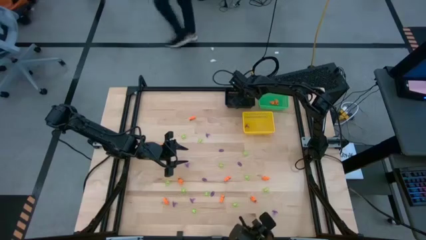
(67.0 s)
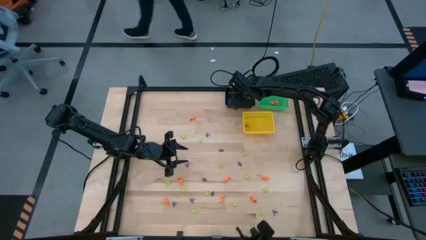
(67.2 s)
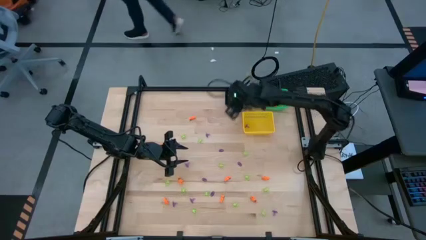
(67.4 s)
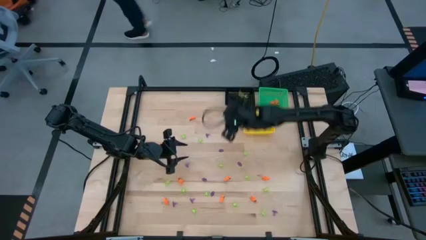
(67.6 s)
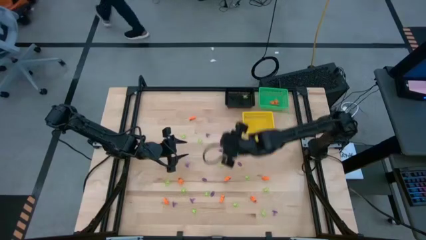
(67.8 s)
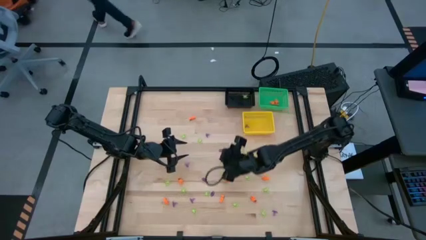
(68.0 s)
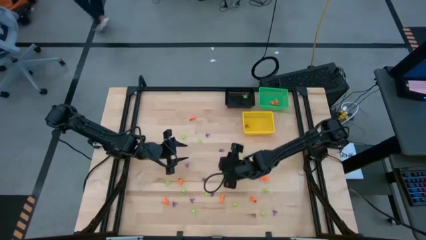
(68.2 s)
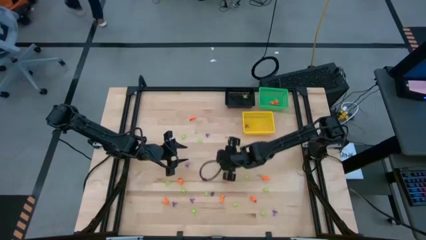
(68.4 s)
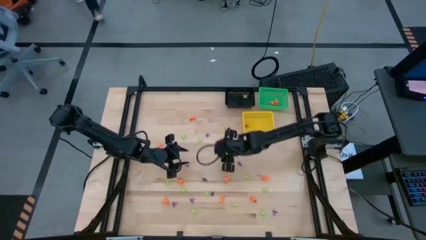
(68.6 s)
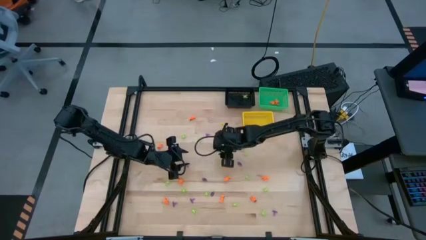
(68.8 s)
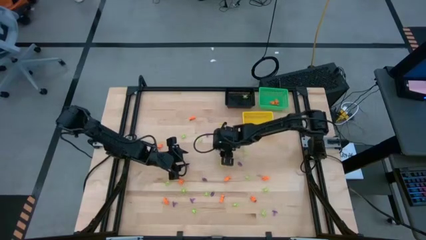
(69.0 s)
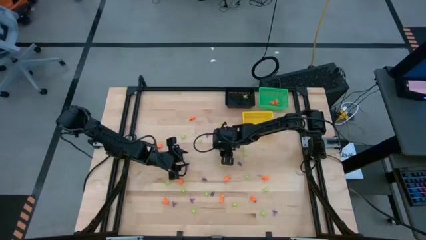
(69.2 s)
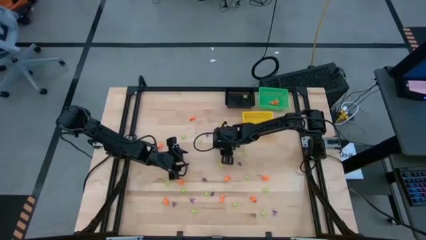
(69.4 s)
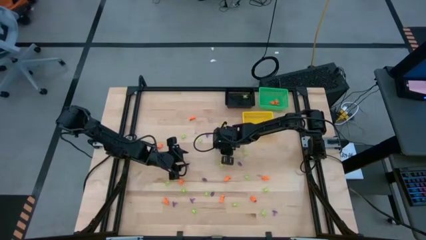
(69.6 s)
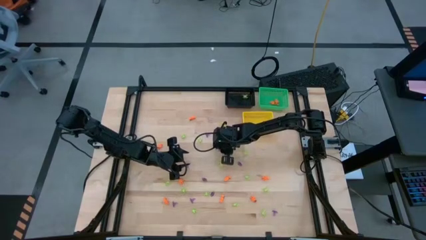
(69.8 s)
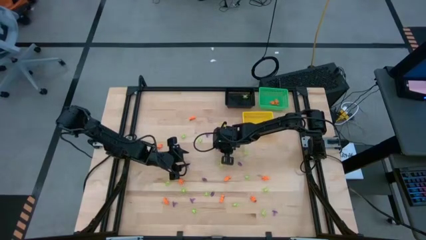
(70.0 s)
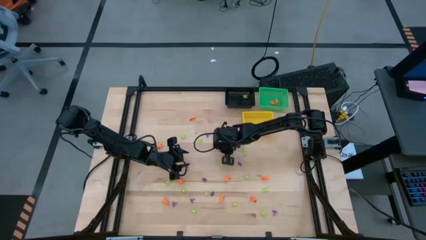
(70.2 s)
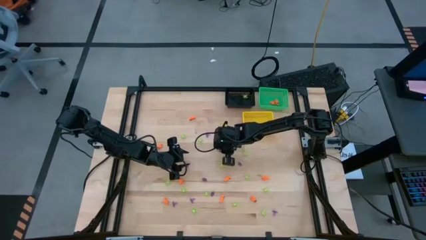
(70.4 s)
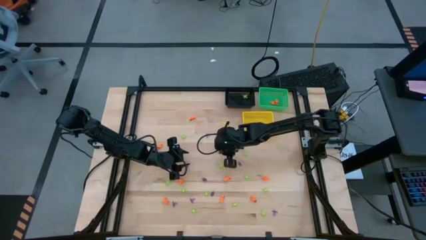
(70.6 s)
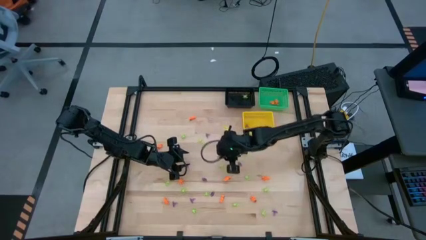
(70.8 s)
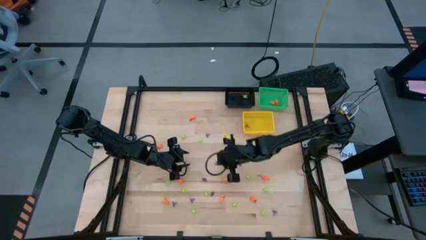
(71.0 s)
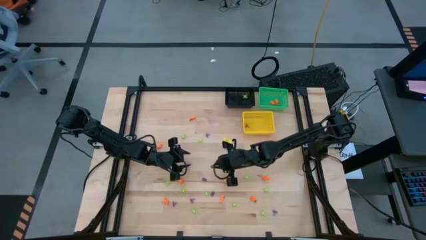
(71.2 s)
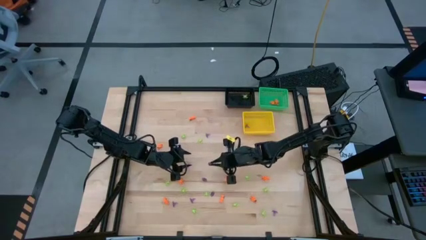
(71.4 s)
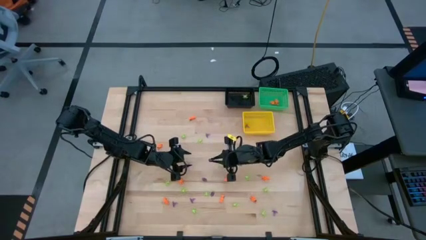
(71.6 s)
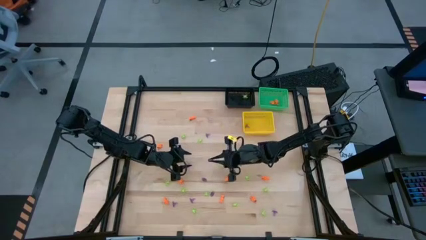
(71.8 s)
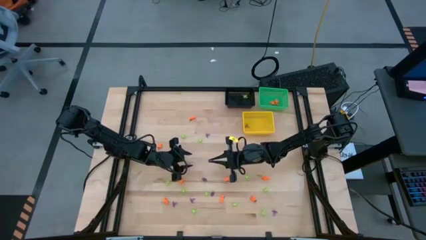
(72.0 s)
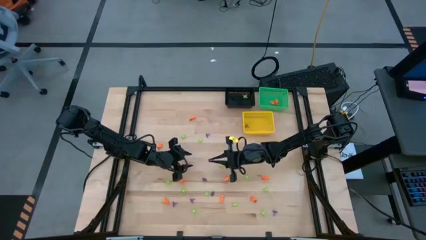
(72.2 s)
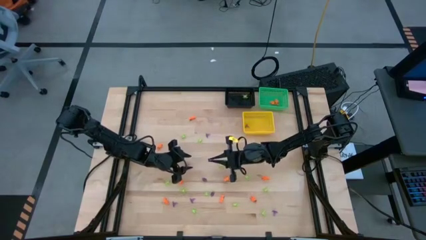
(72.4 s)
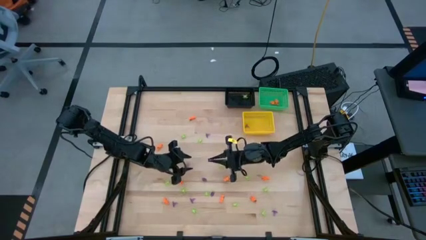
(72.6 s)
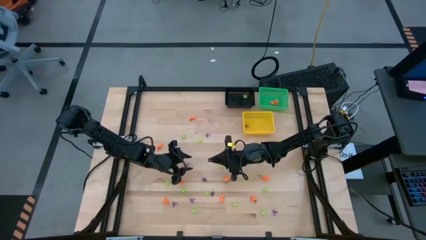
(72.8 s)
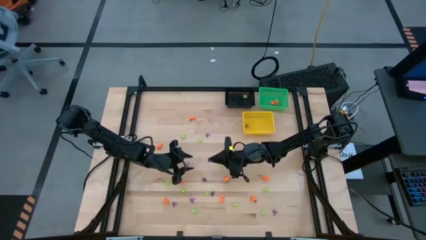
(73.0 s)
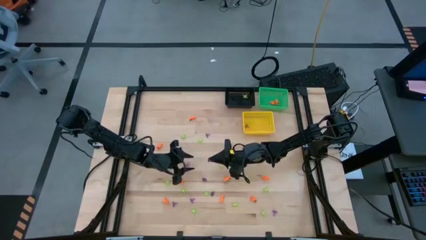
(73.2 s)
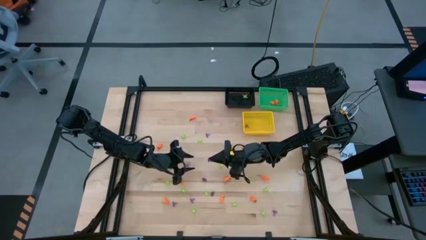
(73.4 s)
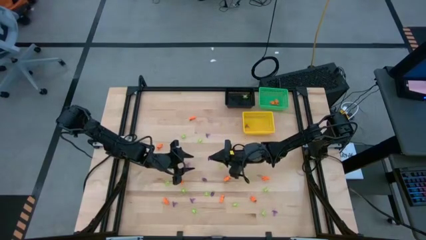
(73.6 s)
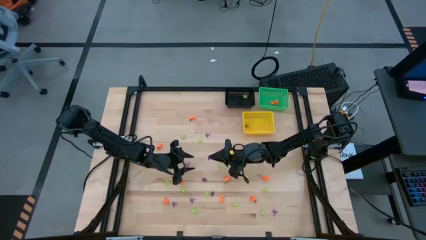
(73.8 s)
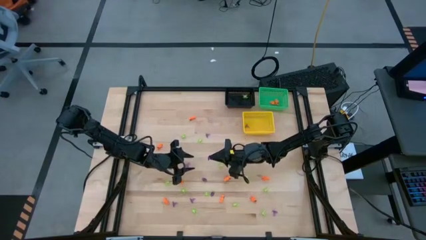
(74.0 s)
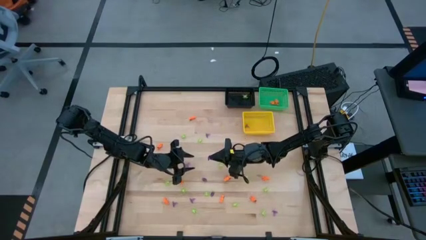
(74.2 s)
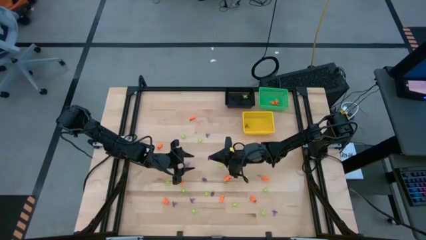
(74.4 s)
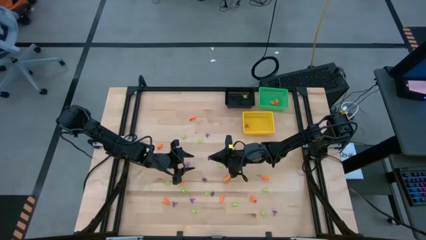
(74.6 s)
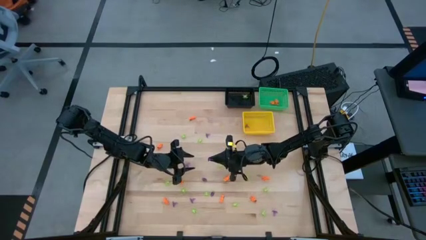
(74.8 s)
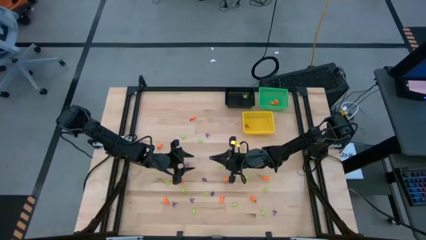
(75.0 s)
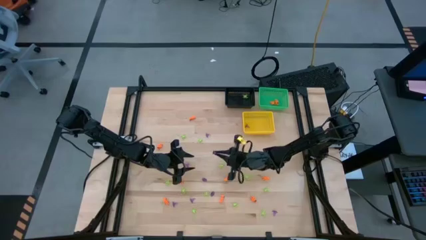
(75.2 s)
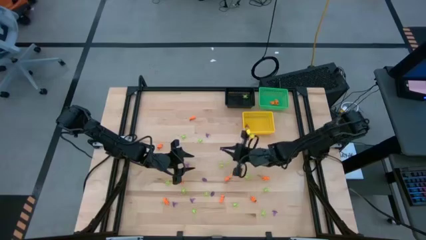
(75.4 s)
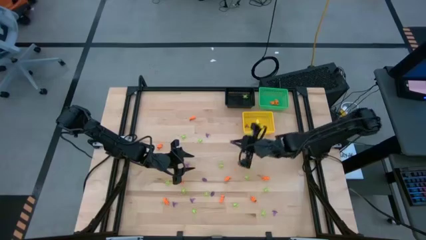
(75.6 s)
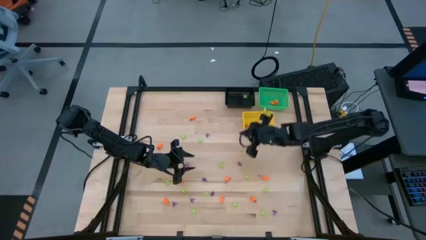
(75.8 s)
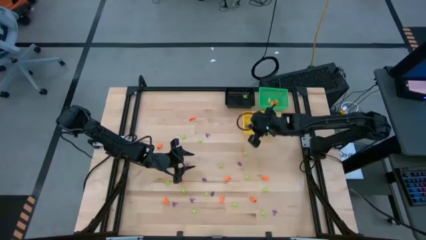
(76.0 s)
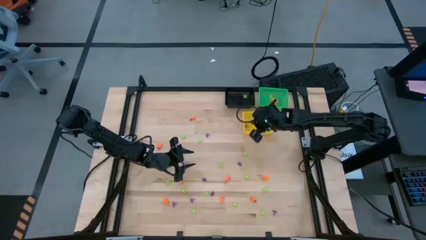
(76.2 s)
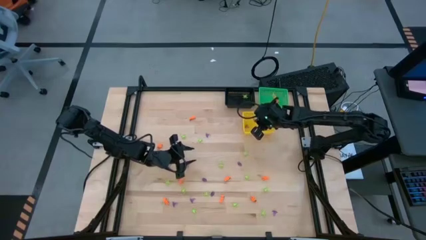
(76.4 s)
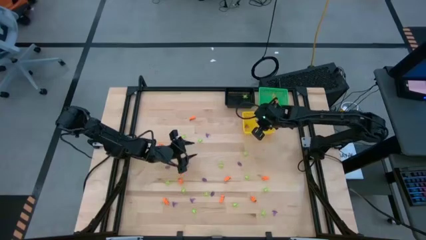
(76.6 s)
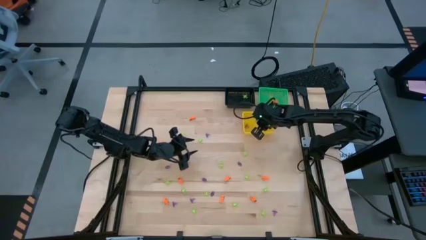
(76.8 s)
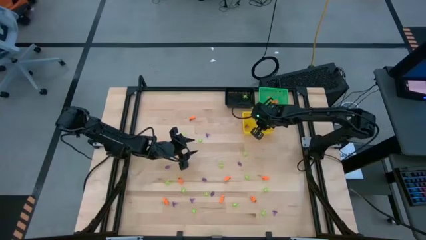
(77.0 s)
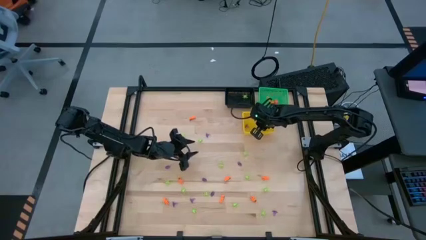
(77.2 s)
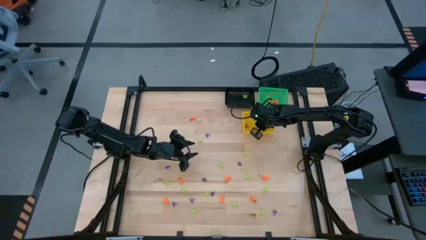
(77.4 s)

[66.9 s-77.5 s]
Task: Sort Halloween decoration
Put the violet witch hat toy into the yellow basket

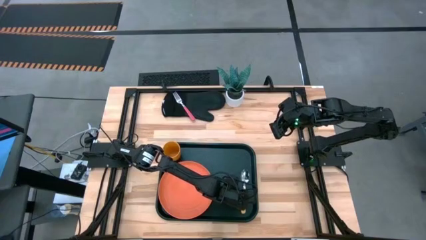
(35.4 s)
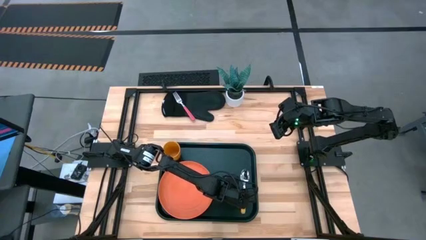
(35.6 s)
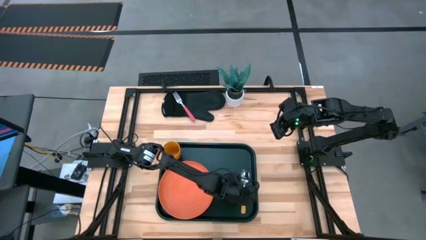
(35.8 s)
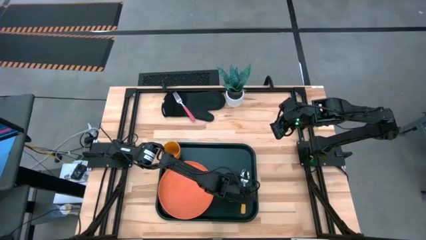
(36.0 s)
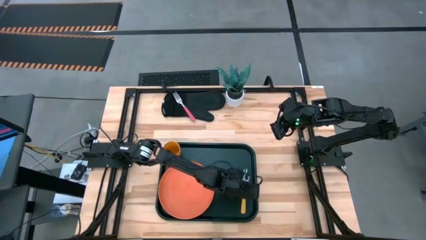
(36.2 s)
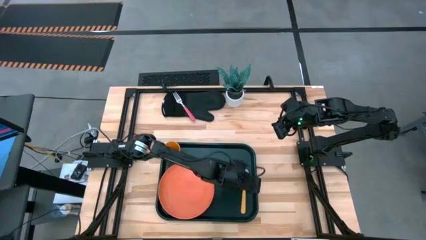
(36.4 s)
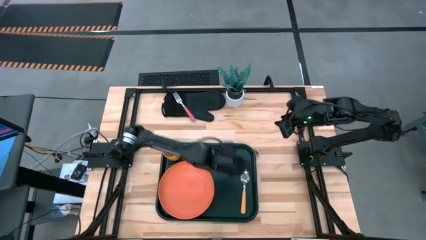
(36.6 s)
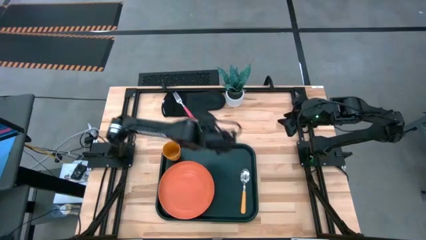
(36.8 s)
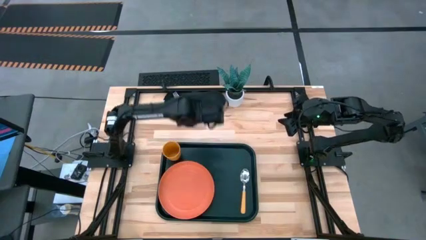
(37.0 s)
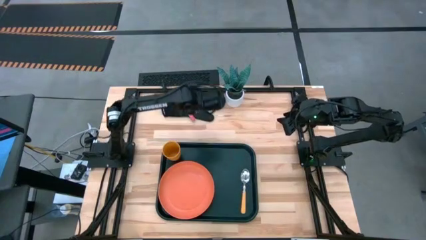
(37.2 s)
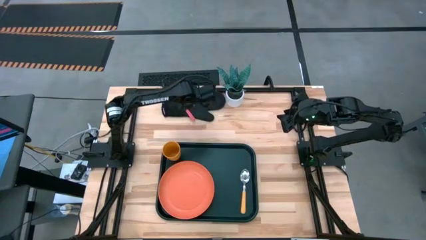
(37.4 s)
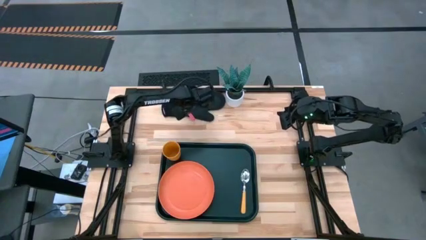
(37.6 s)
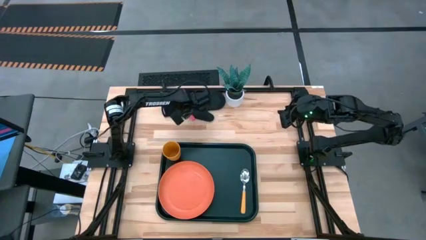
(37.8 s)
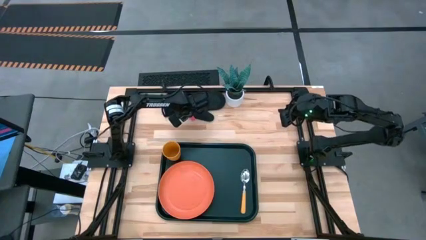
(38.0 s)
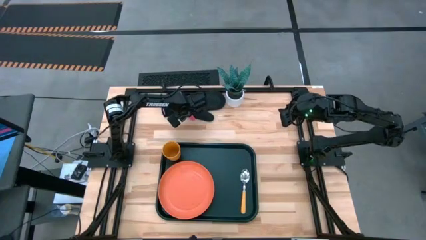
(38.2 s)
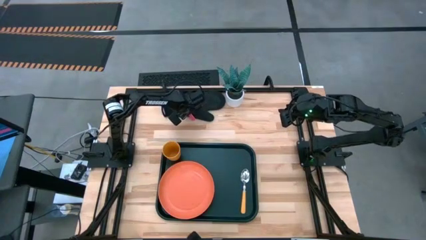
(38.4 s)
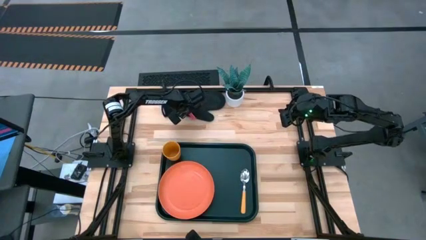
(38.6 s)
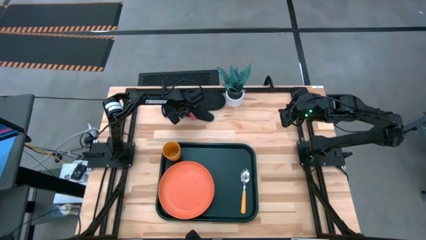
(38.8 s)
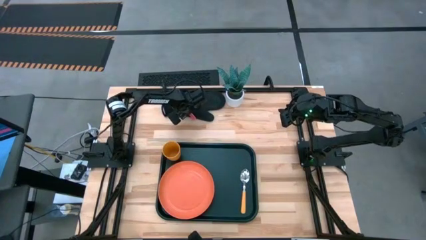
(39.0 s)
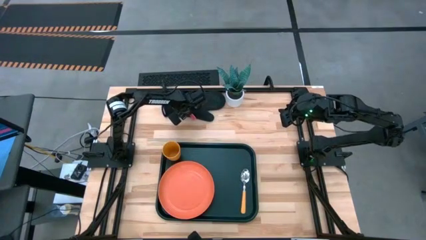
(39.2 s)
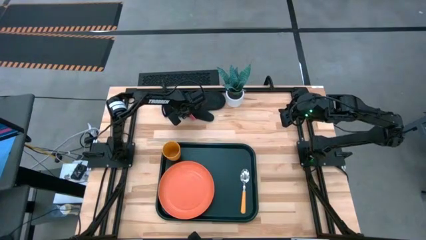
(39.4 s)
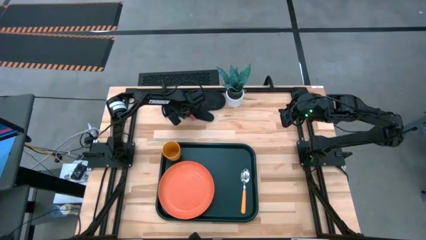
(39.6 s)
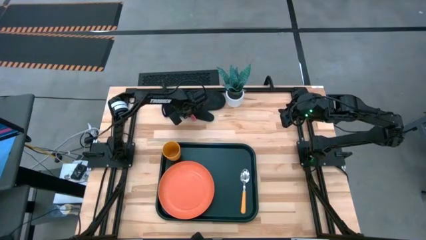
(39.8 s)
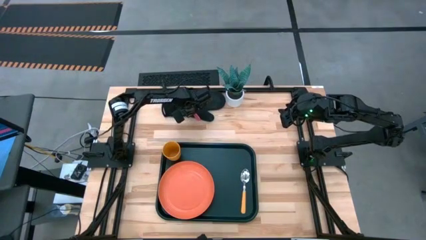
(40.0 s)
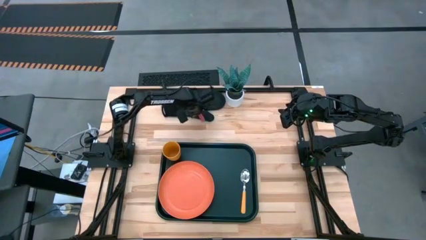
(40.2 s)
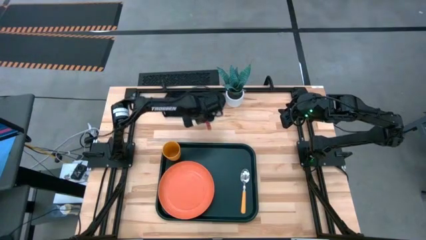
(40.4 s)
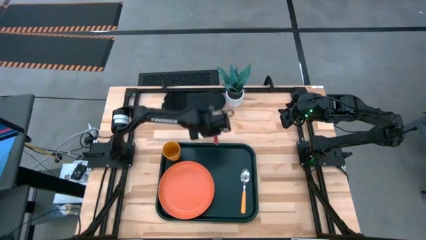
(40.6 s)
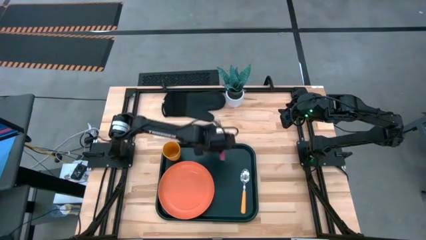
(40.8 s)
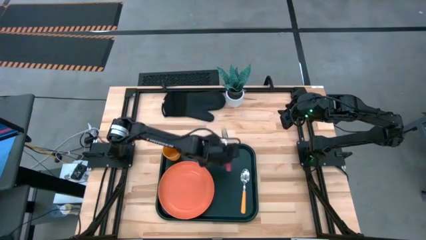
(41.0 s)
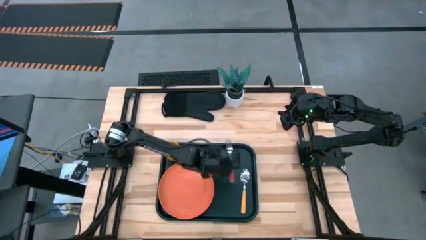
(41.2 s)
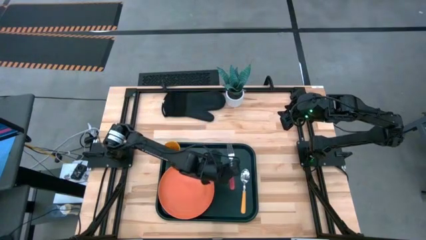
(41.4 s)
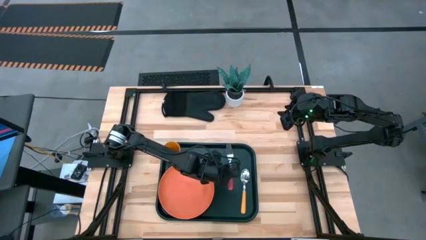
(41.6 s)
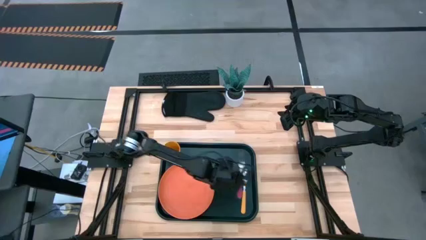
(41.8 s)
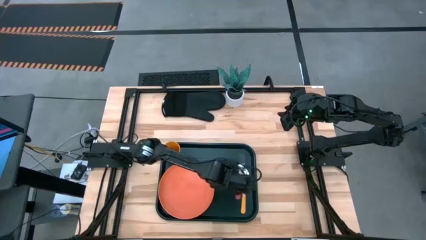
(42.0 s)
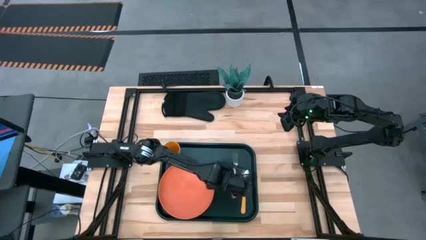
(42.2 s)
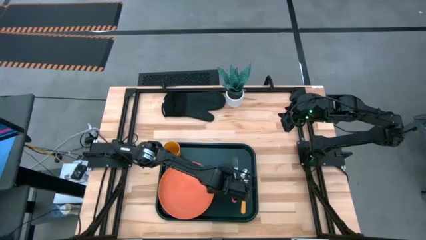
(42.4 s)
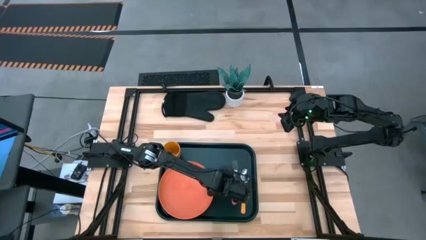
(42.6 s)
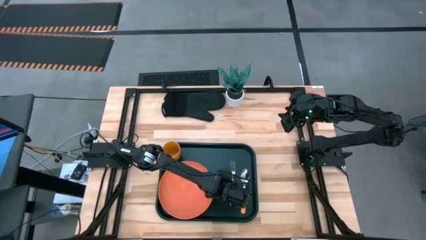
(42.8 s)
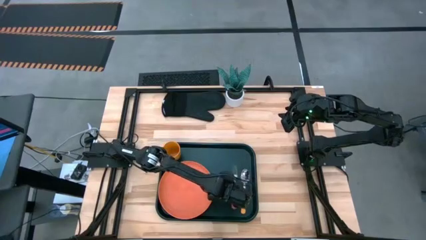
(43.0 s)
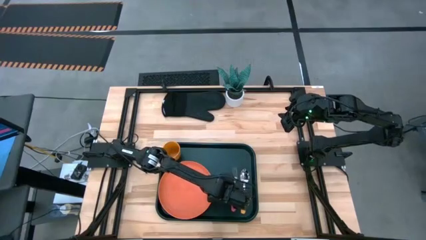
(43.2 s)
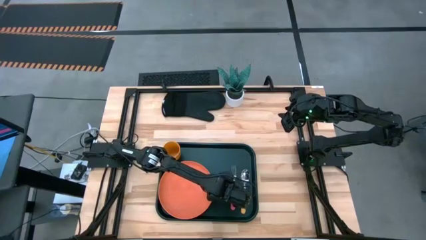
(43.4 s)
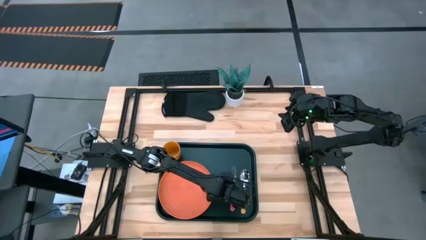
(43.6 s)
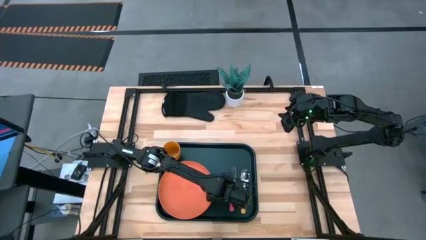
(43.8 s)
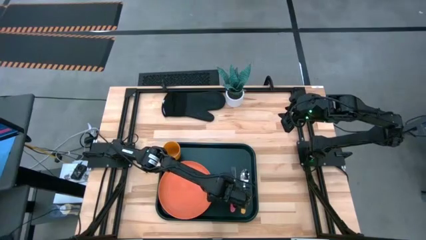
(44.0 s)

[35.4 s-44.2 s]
Task: Pick and place plate/cup/fork/spoon on tray
Put the pink fork to the left of the yellow spoon on the black serving tray
